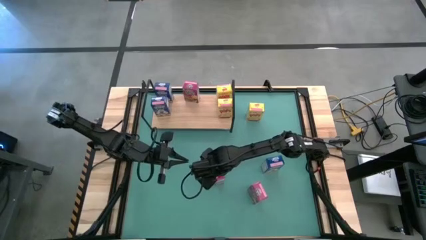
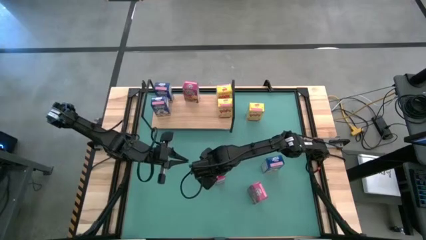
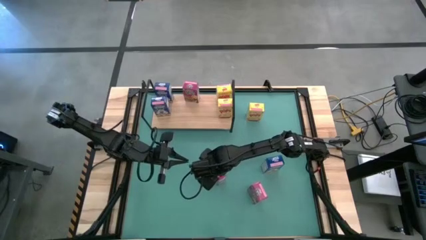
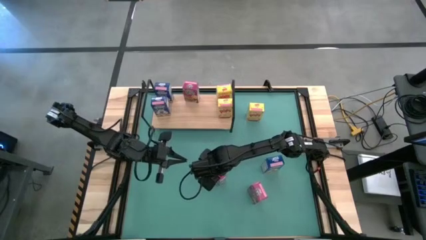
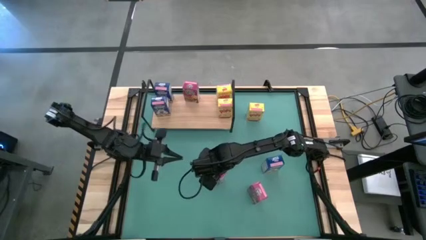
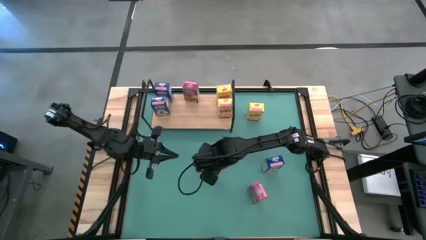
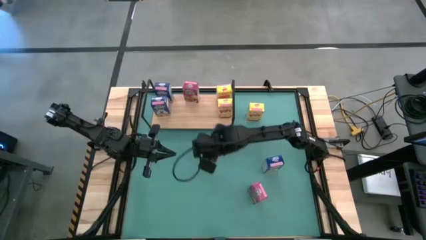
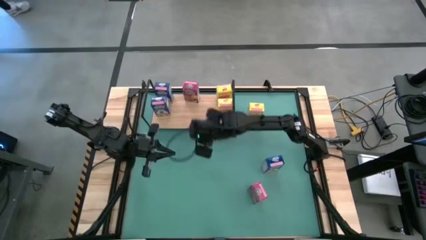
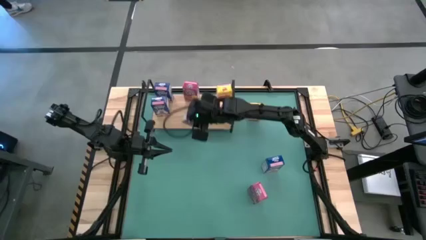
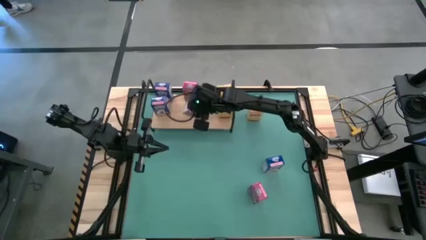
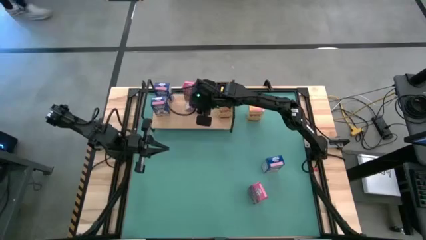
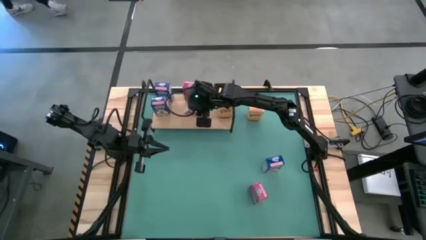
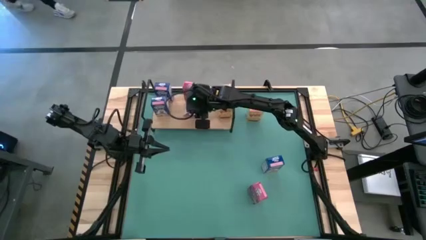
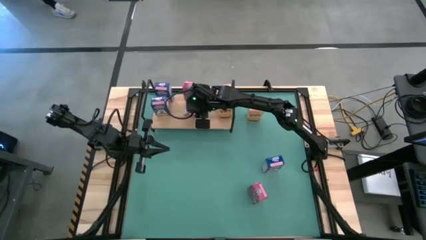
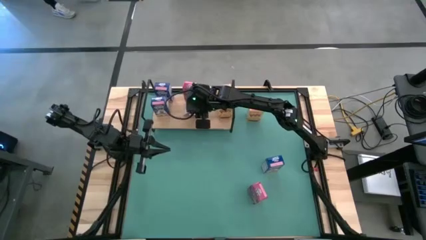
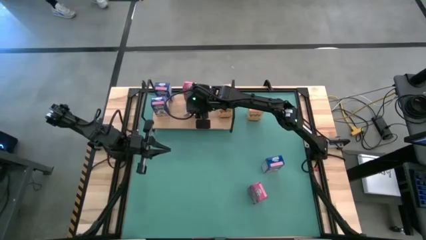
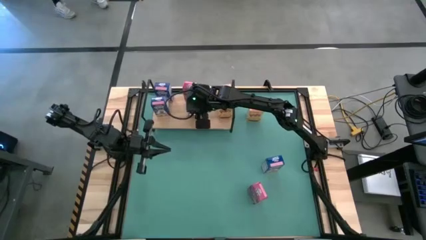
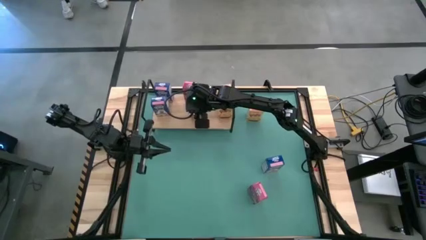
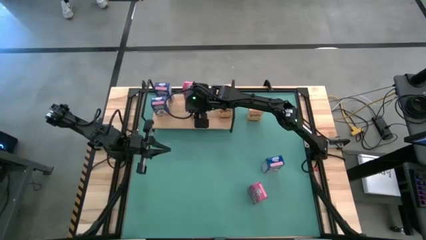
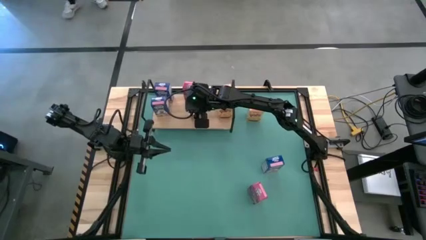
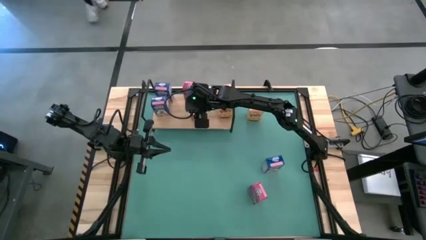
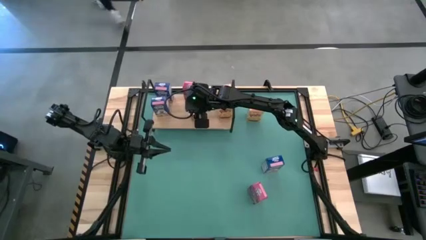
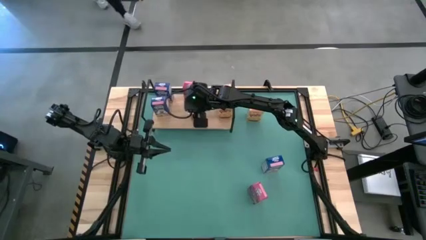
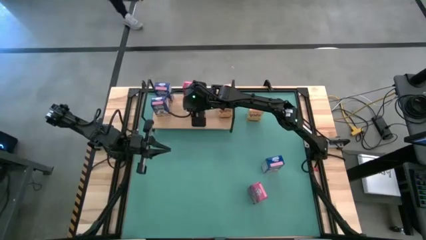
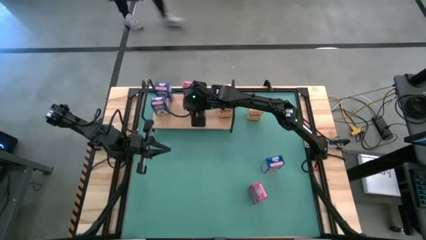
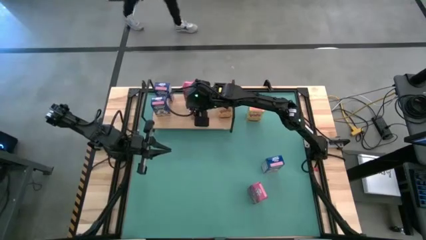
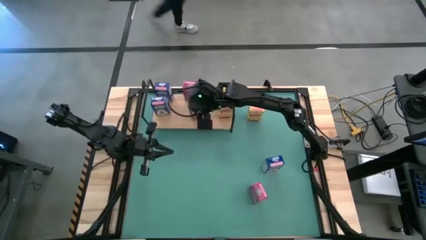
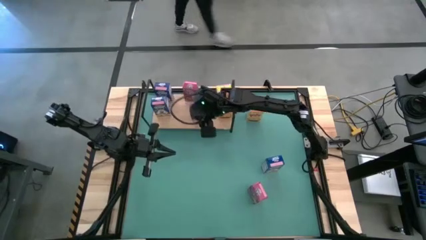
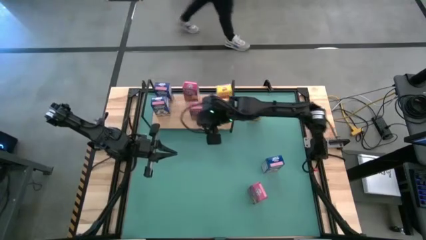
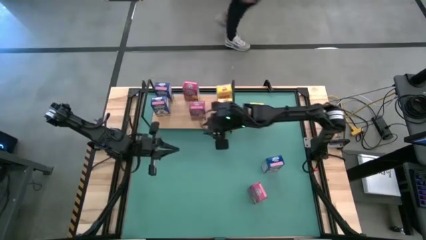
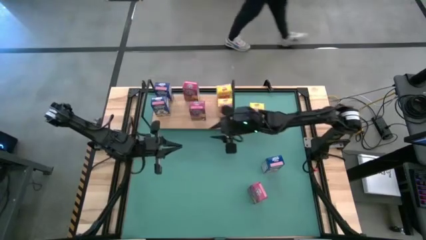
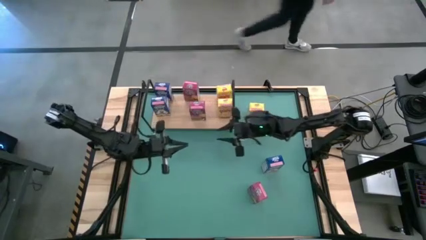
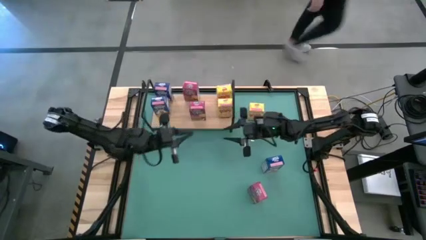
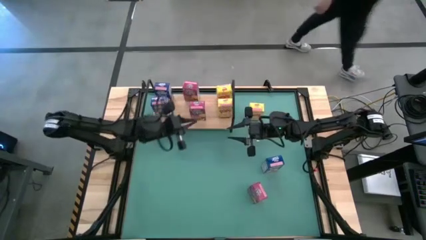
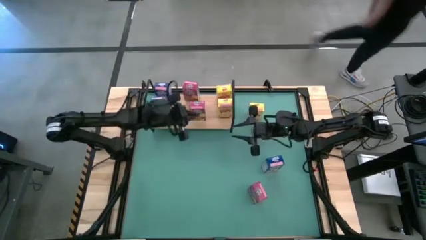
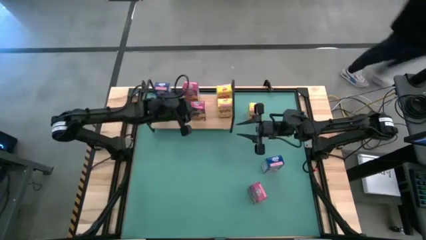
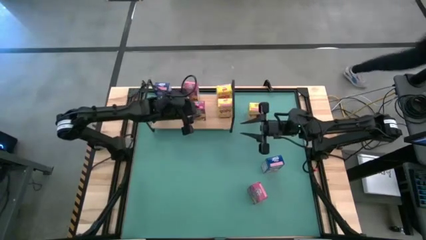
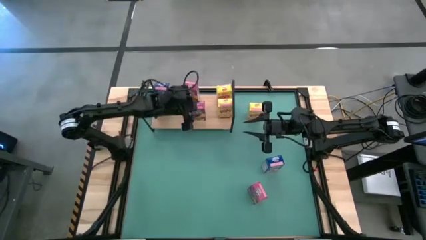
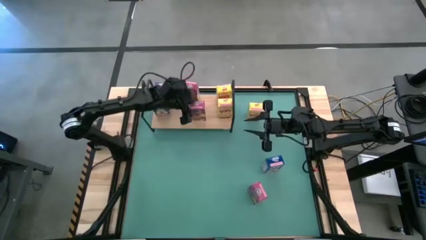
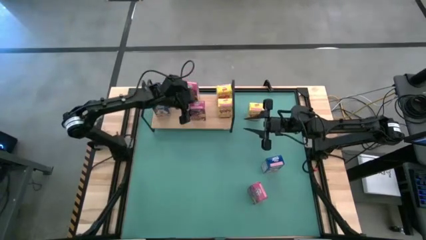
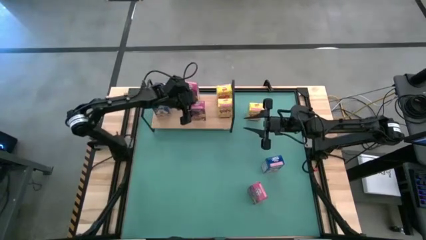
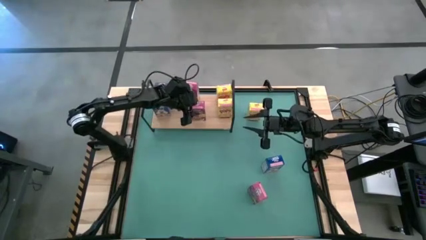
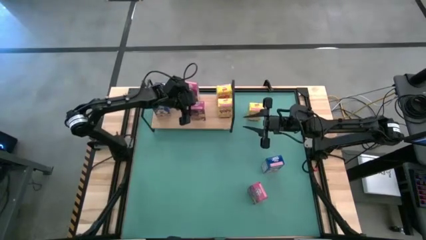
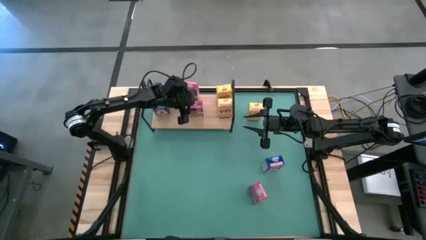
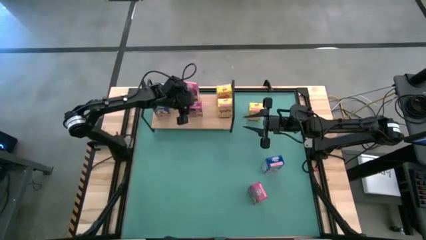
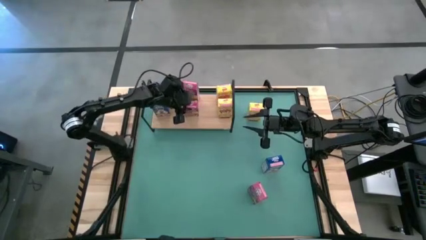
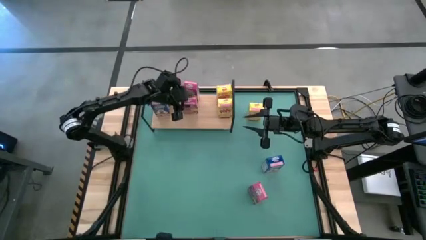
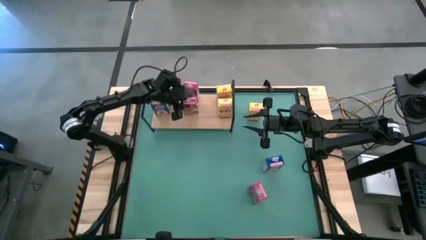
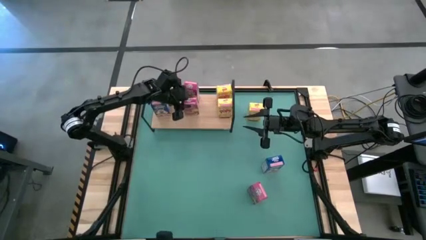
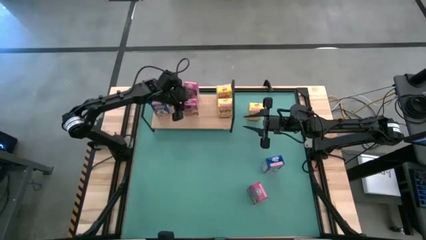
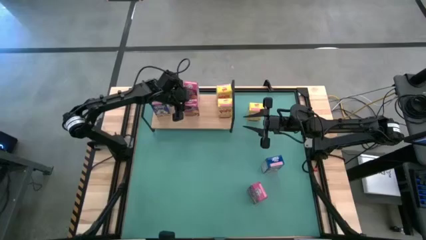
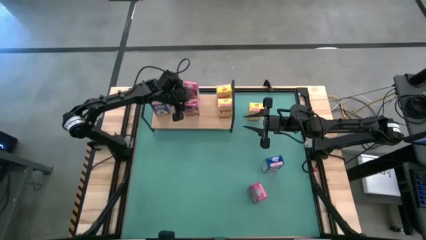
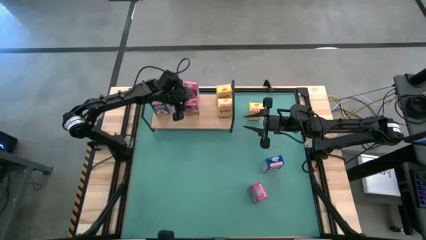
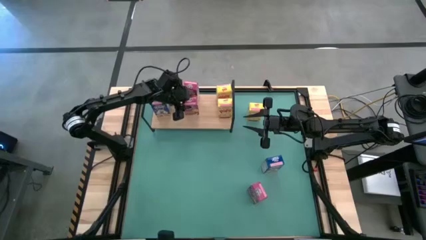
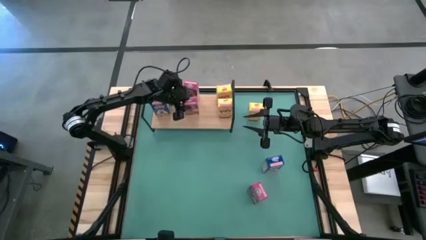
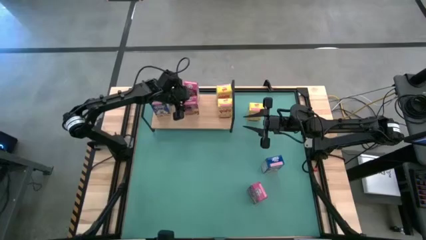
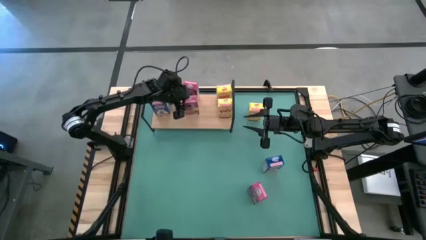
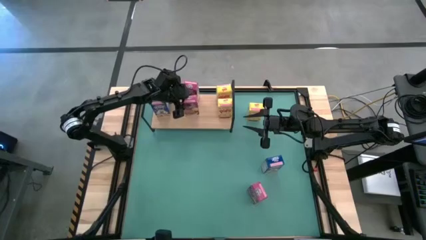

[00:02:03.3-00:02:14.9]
Task: Stack cereal on shelf
Put the left pink cereal box on the shelf

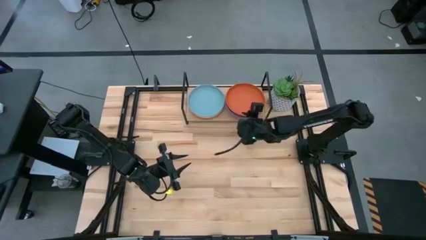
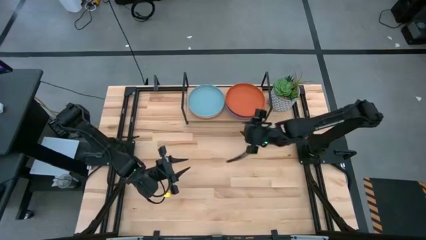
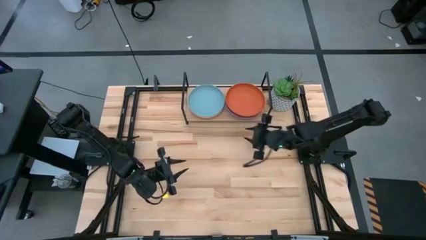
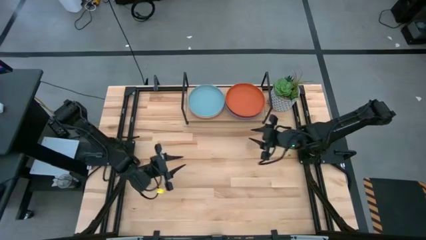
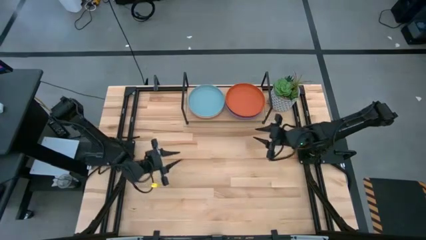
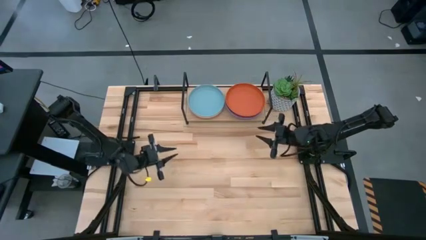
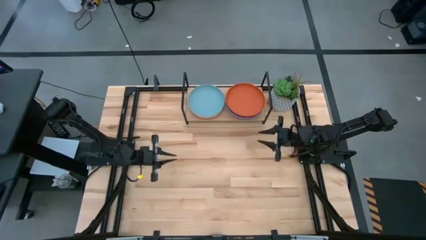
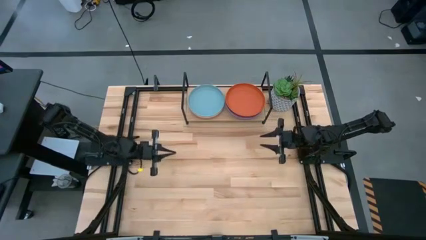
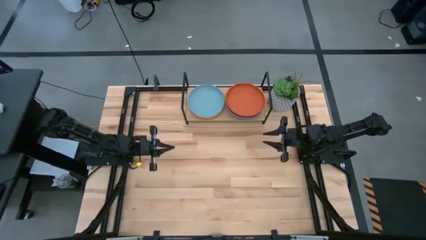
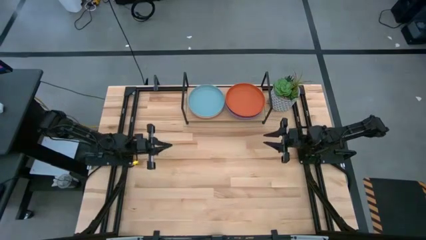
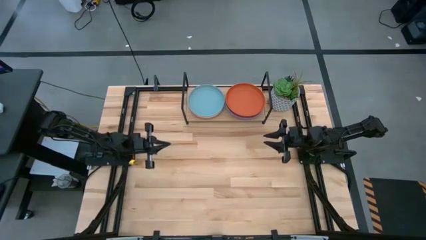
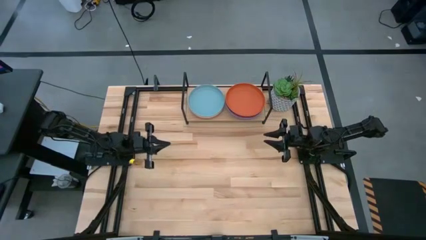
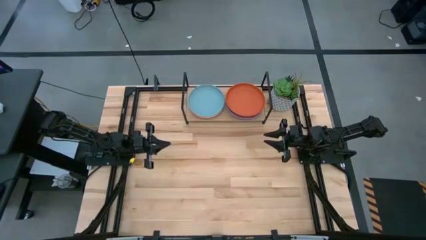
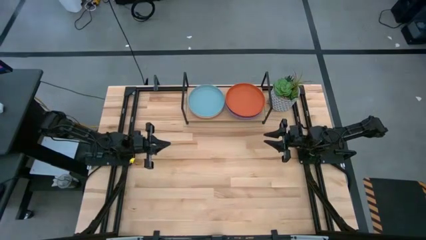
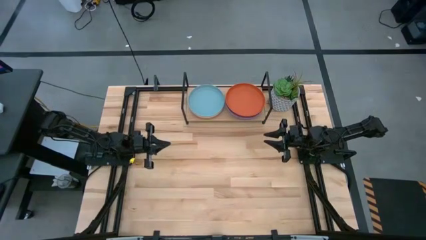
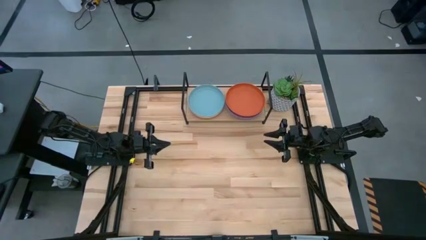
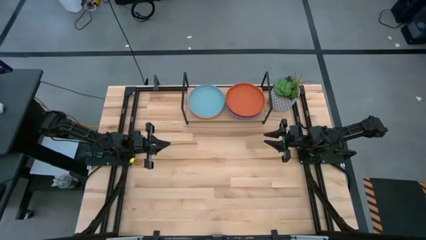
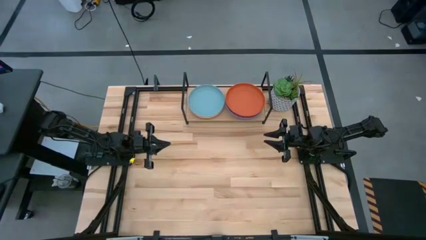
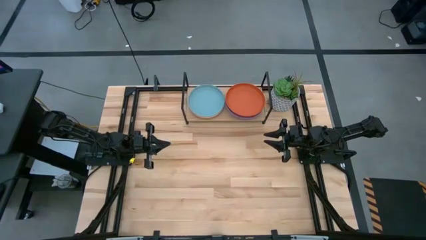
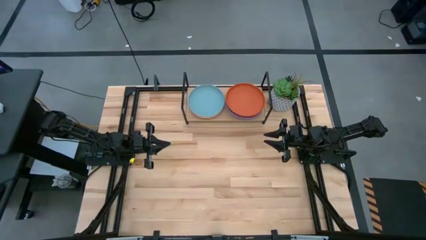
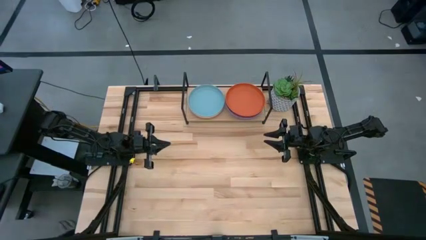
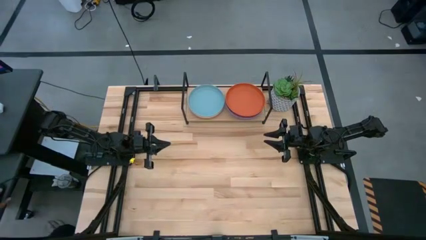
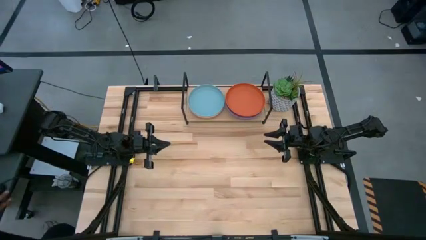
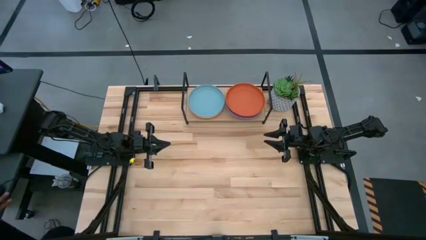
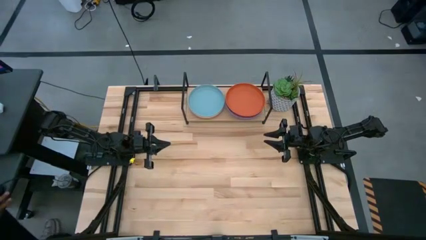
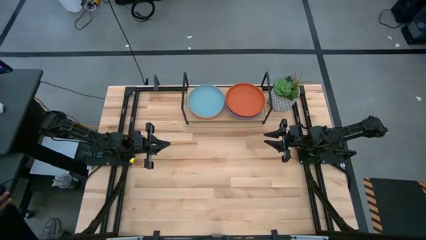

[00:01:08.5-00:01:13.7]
Task: Place and stack plates onto a shelf
Return to Home Position
